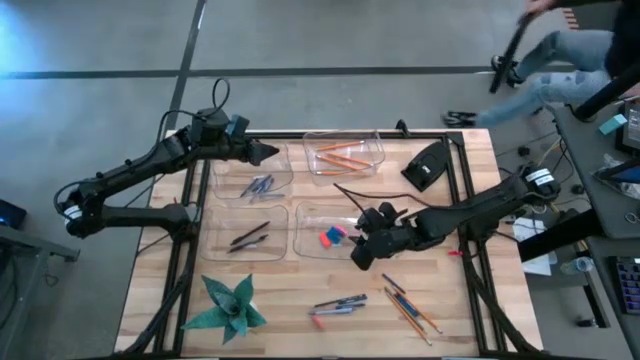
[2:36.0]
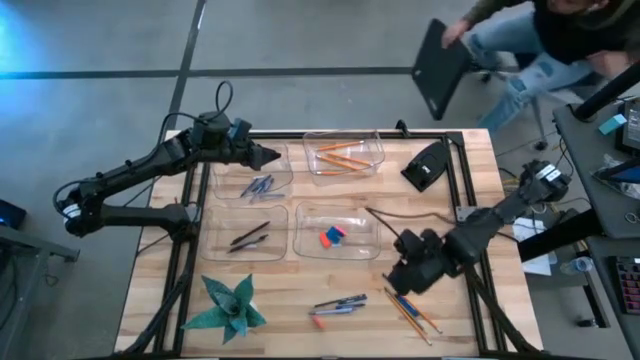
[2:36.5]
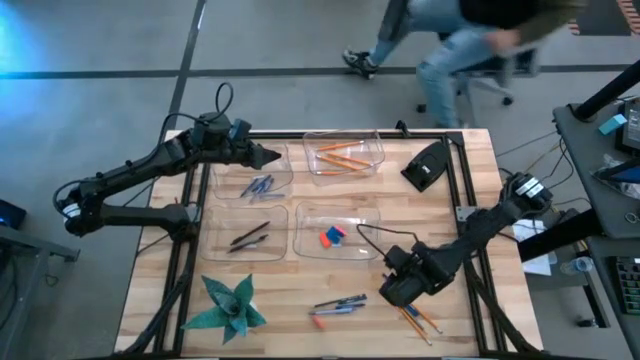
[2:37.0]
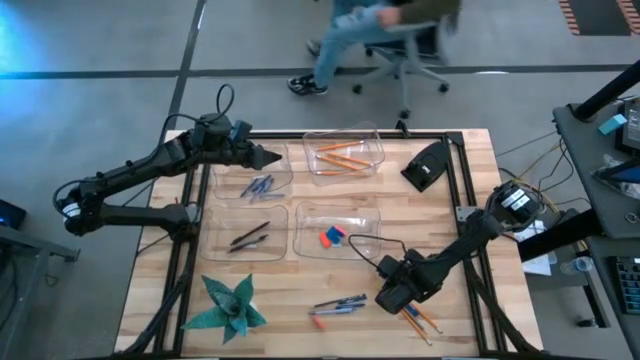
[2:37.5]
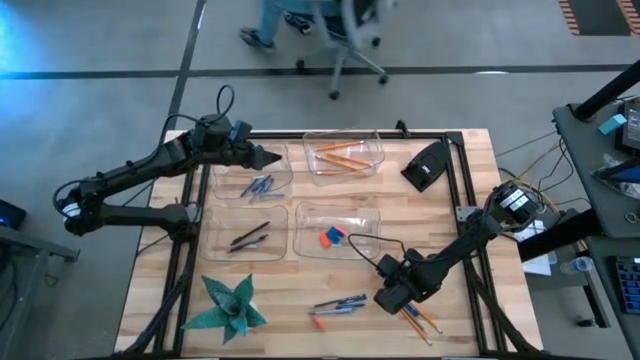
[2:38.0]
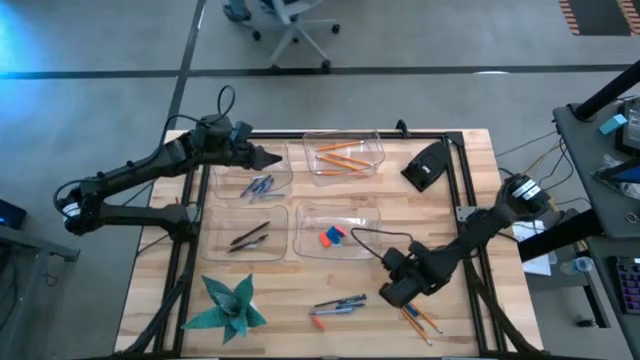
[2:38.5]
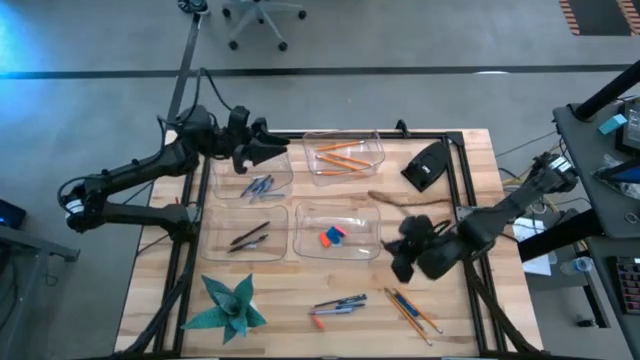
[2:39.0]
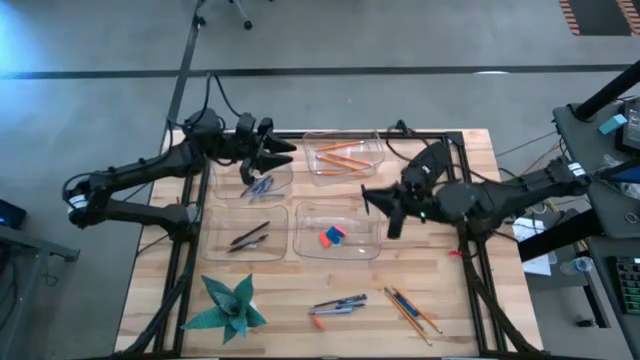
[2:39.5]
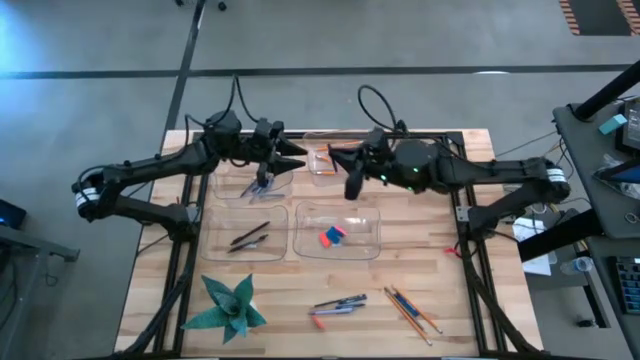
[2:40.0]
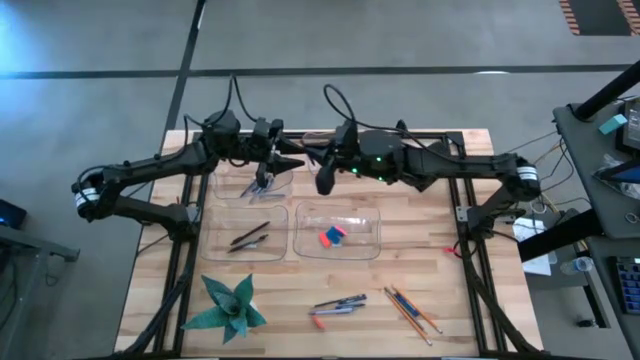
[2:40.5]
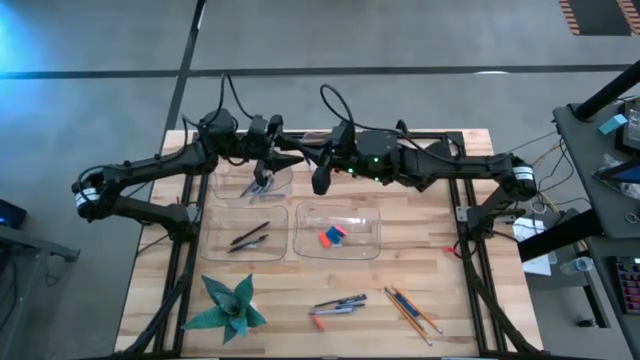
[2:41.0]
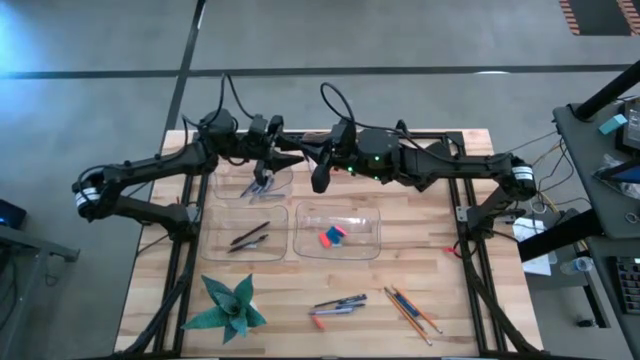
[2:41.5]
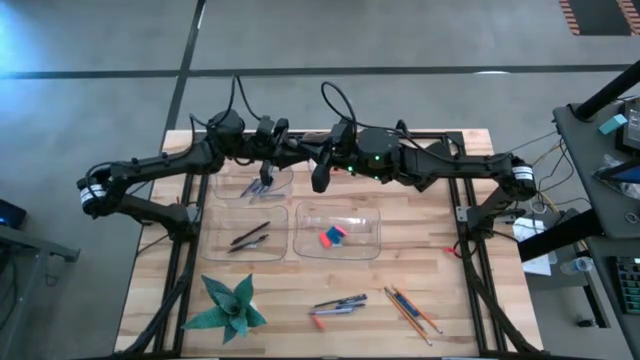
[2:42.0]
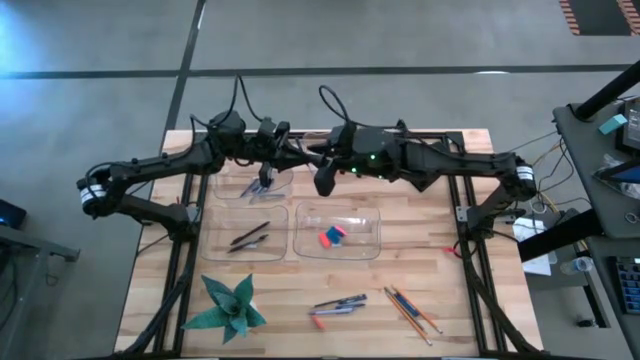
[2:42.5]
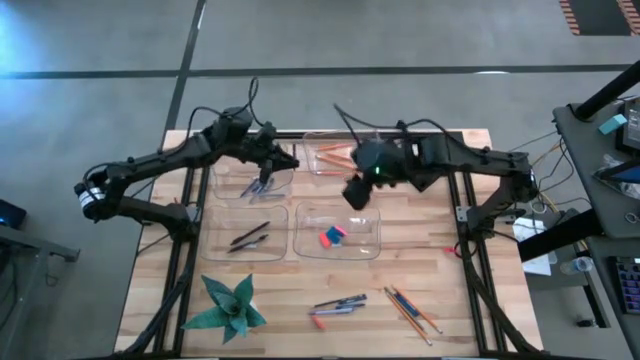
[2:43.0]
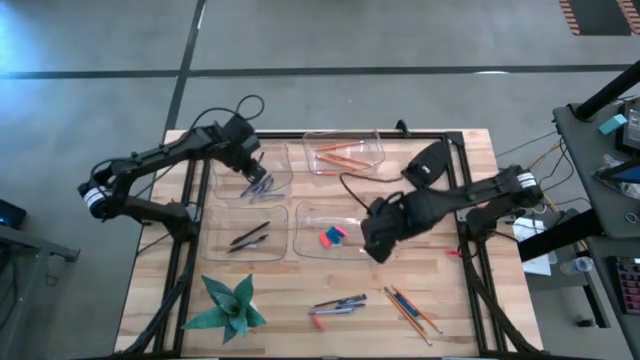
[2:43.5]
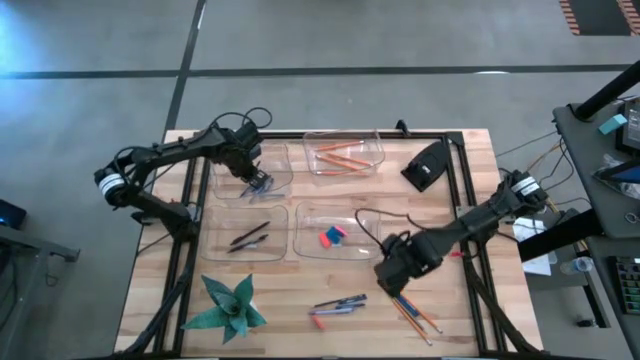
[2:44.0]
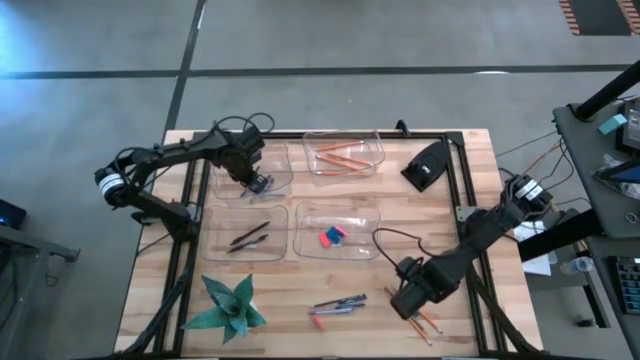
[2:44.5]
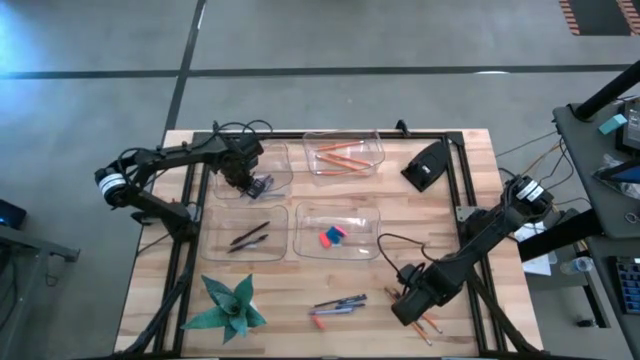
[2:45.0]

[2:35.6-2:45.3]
Task: Sort crayons/erasers/pens/pencils in bins
Put the blue crayon into the top left transparent bin

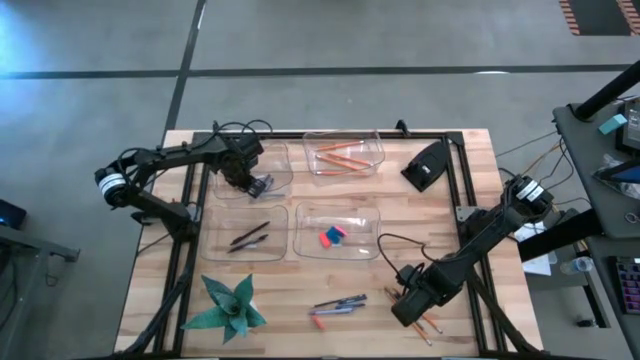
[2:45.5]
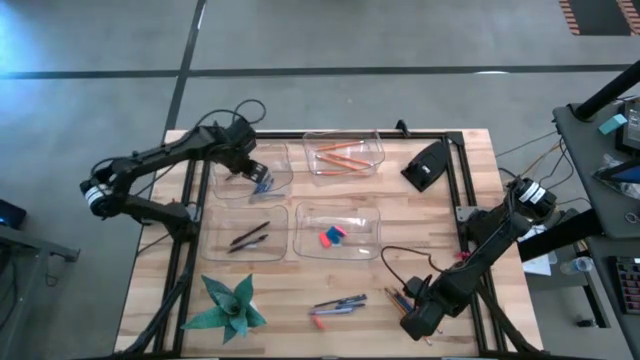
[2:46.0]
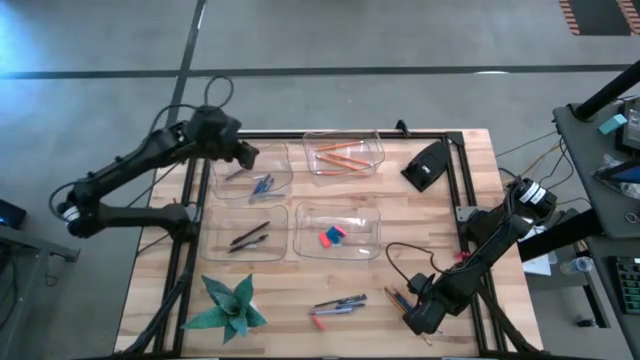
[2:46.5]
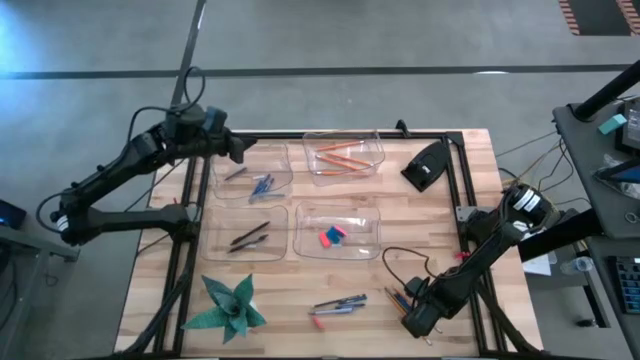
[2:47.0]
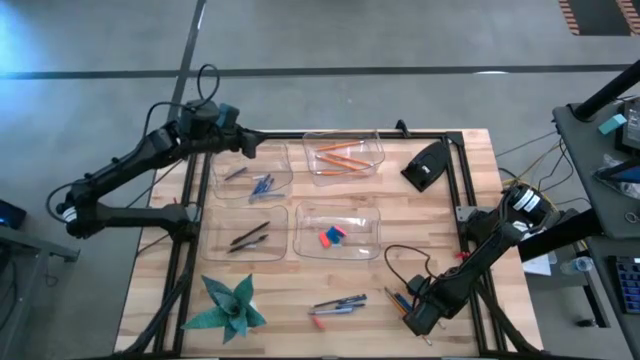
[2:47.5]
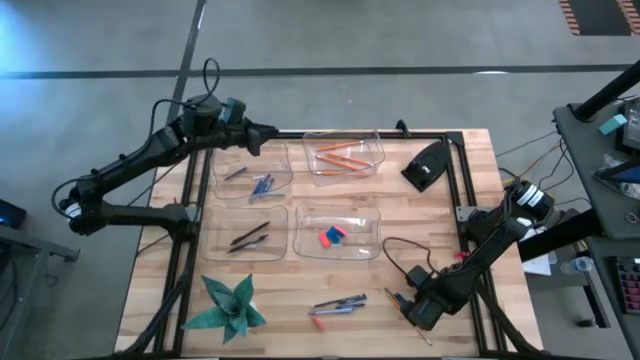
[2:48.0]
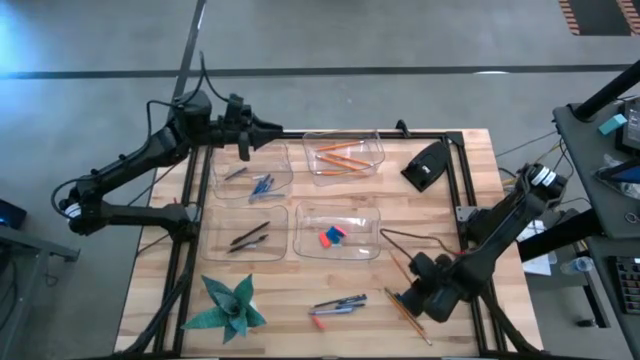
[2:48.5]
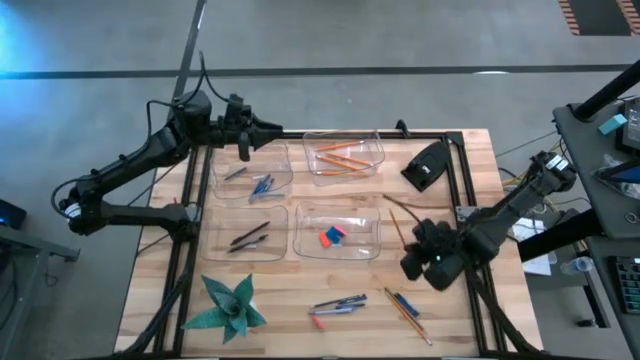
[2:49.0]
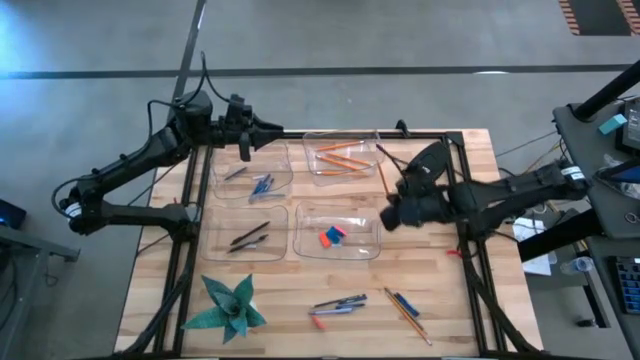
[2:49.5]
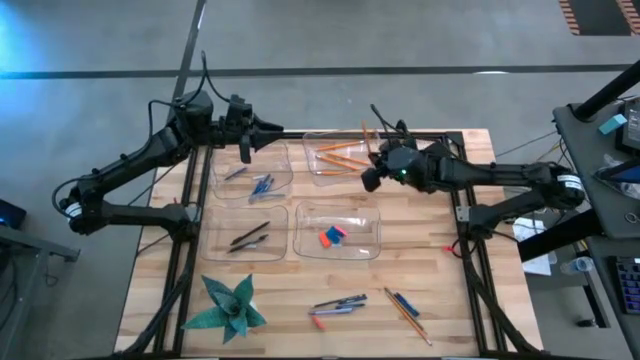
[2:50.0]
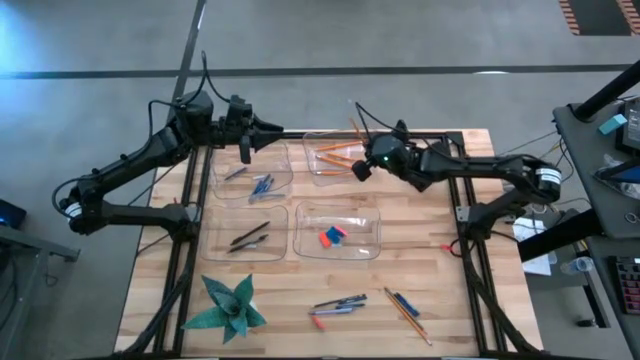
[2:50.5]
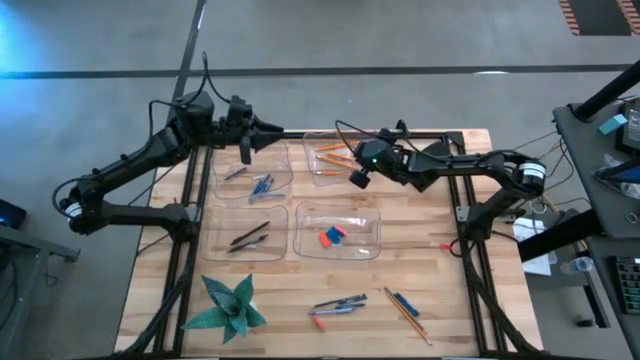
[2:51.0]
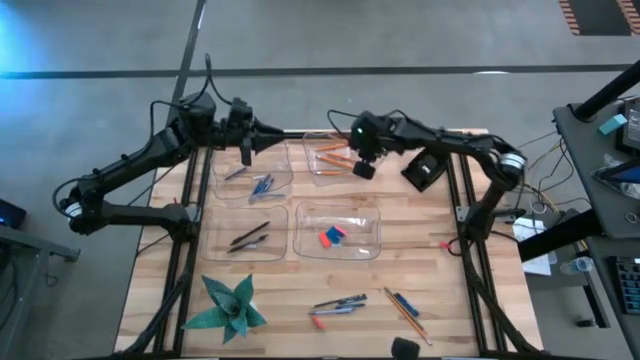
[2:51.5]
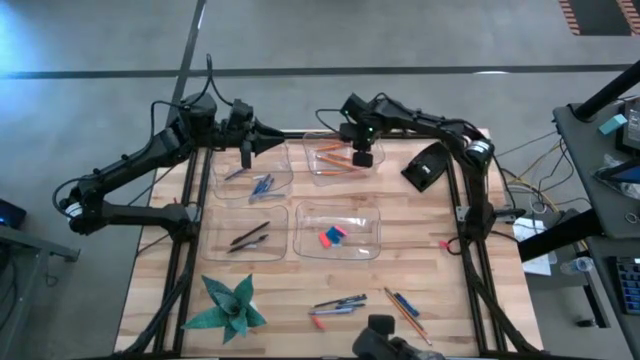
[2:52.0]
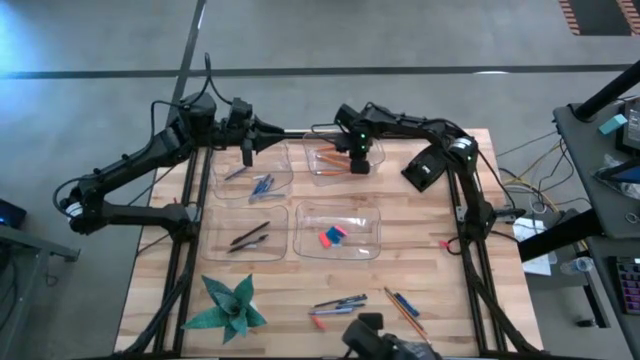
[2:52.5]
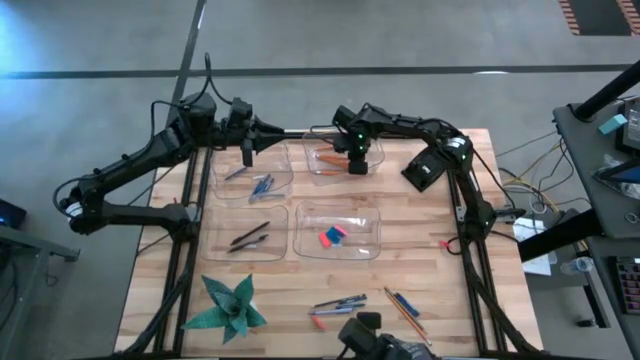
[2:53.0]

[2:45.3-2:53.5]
Put the orange pencil into the top right transparent bin

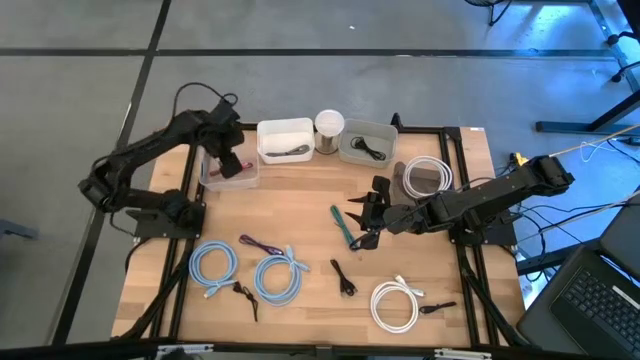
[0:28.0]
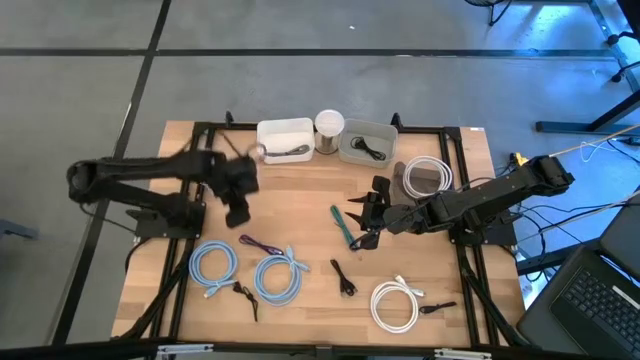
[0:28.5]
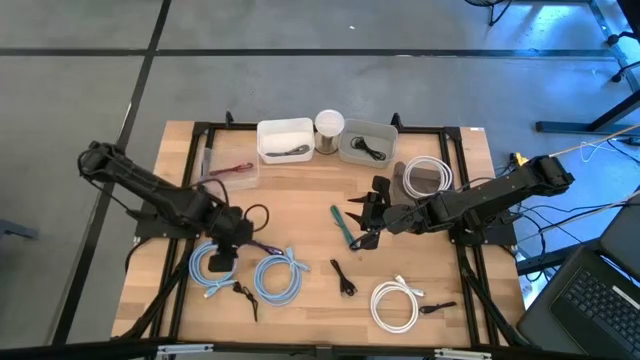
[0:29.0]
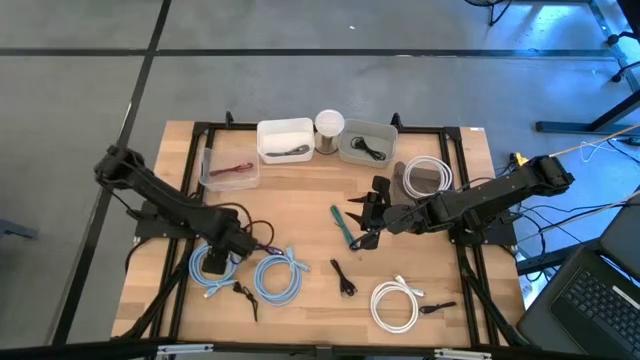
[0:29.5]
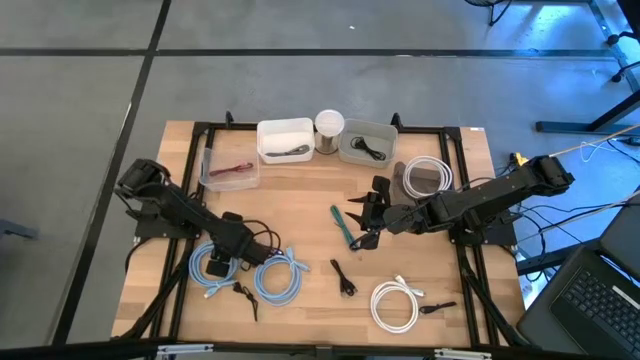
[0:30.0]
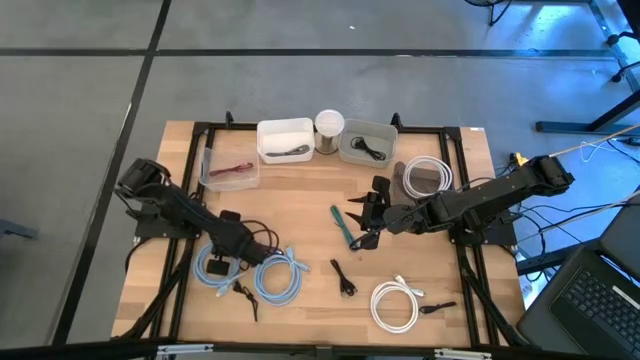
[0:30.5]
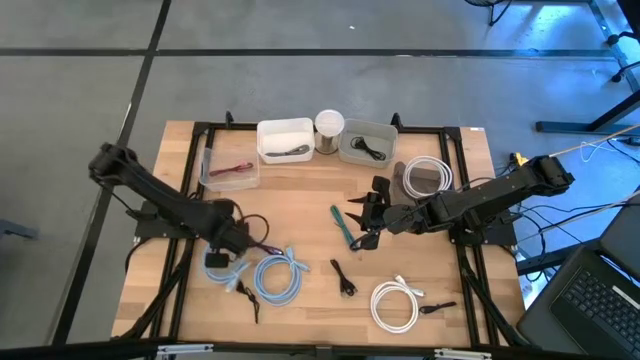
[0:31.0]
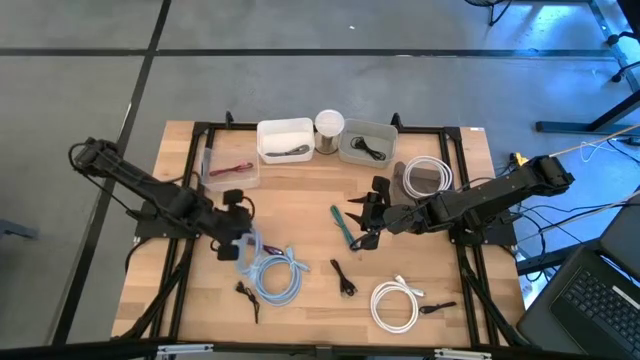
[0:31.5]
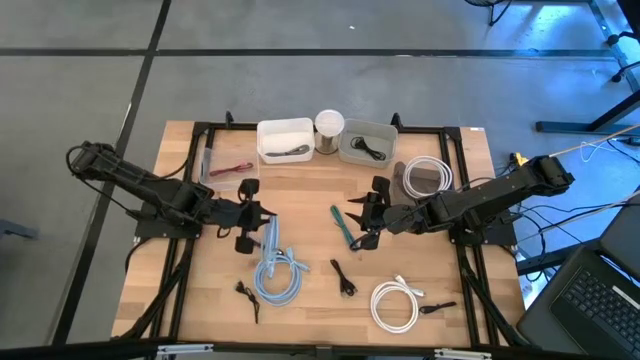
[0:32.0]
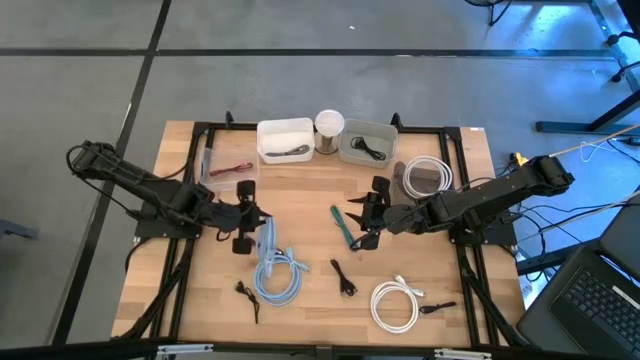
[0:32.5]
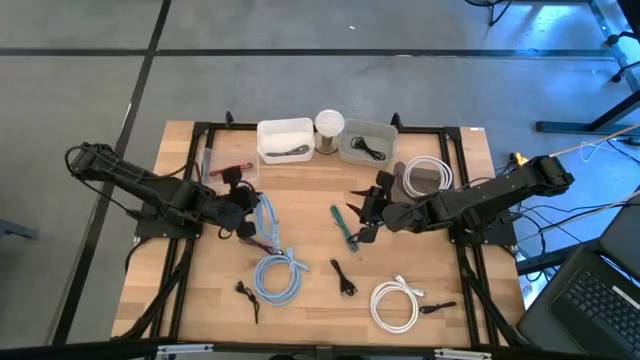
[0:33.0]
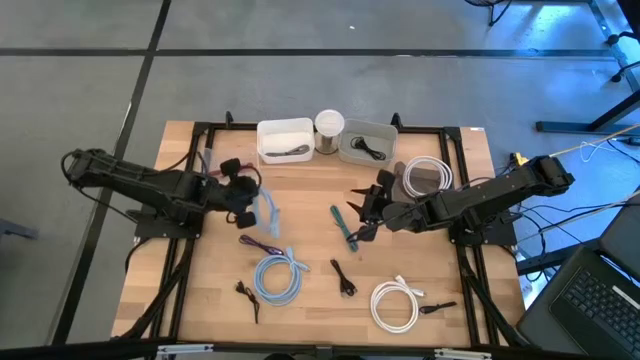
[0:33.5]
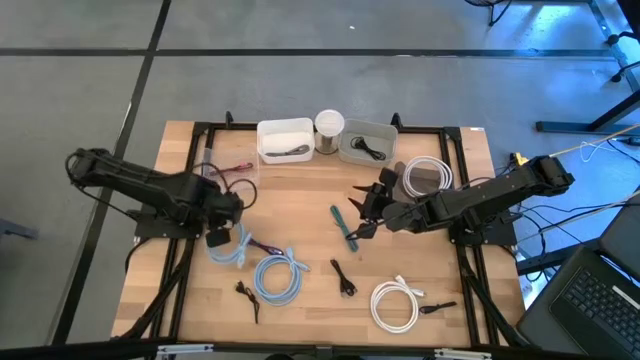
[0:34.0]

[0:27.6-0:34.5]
Task: Pick & Place USB Port
Put the blue HDMI cable into the transparent bin
